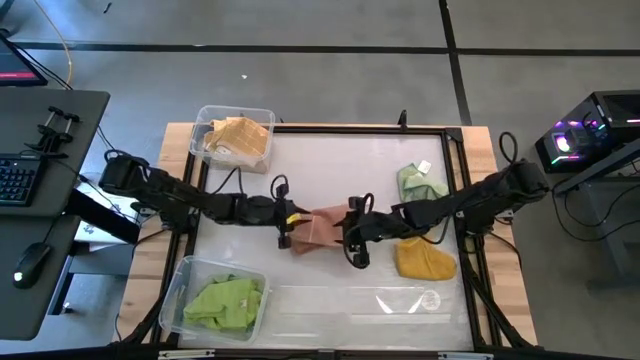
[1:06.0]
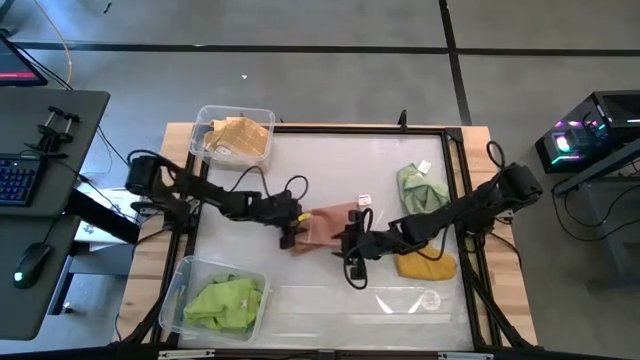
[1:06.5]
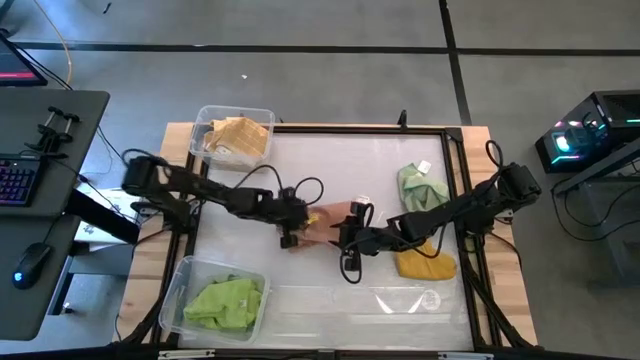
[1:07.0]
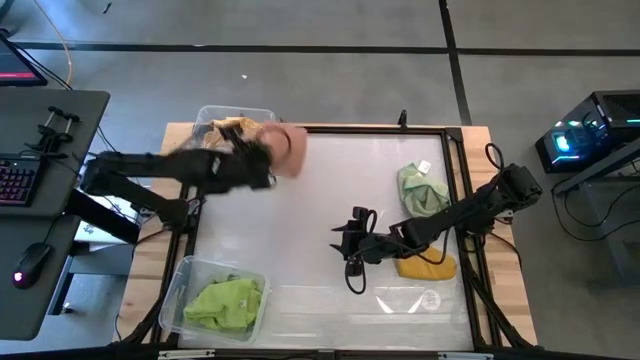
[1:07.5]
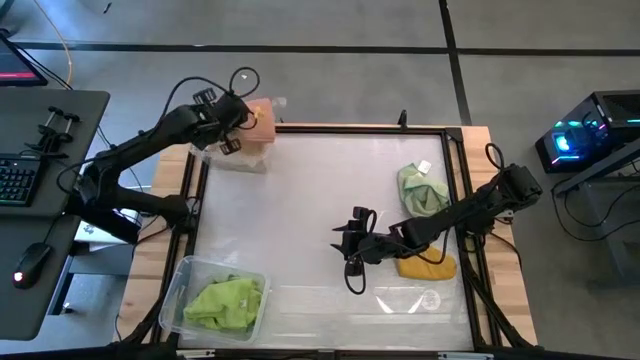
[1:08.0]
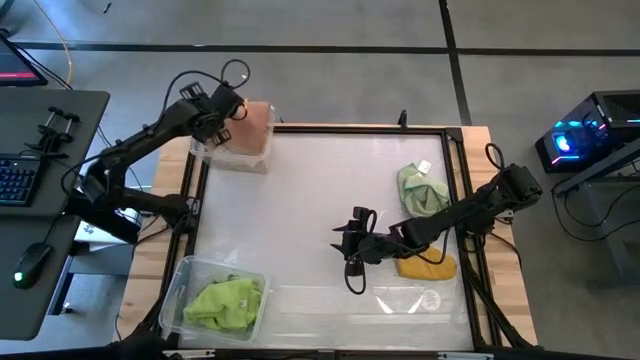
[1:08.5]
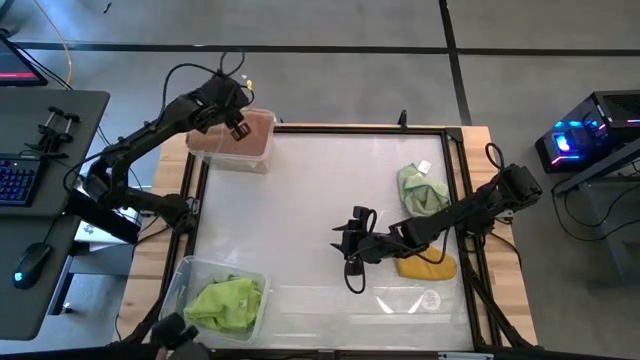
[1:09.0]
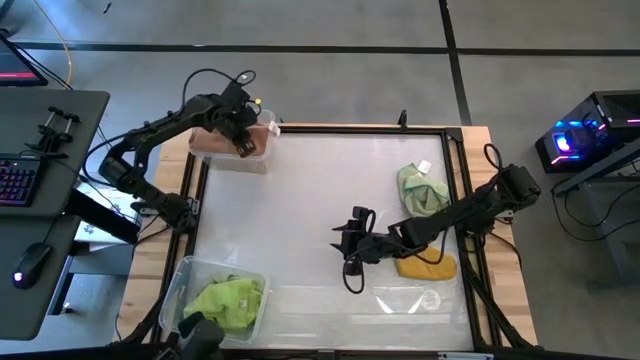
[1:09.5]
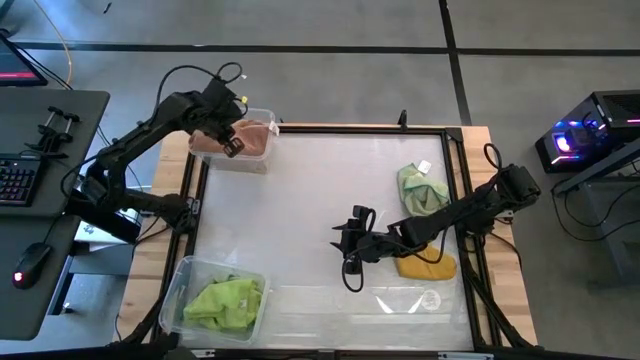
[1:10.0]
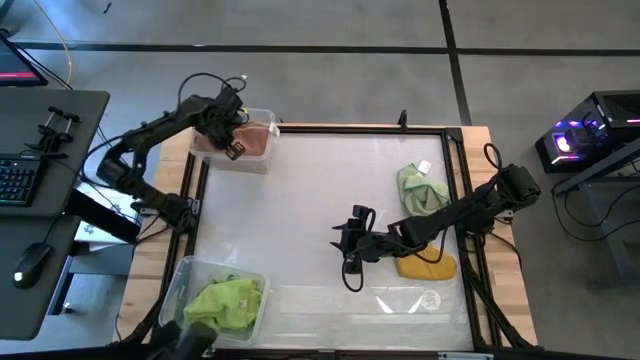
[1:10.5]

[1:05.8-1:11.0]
Task: Sort towels by color in basket
Put the brown towel into the top transparent bin

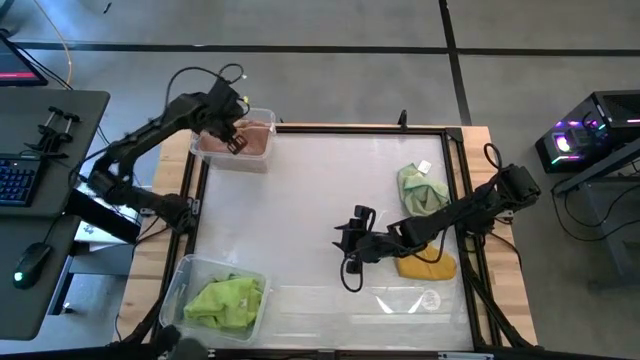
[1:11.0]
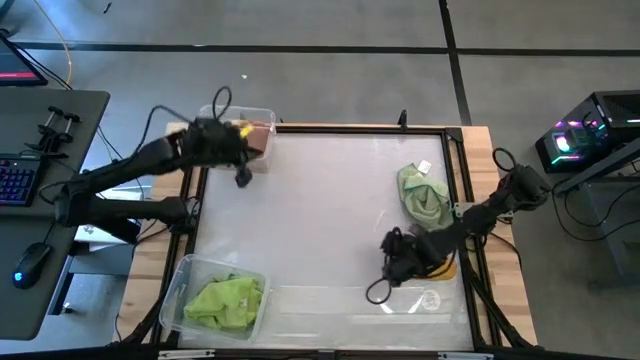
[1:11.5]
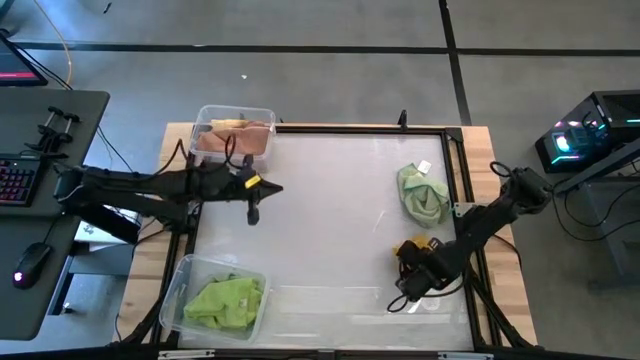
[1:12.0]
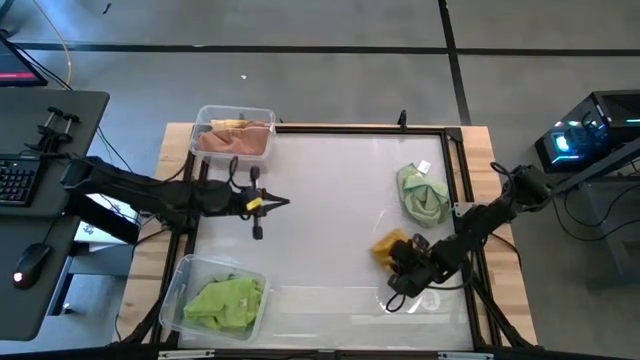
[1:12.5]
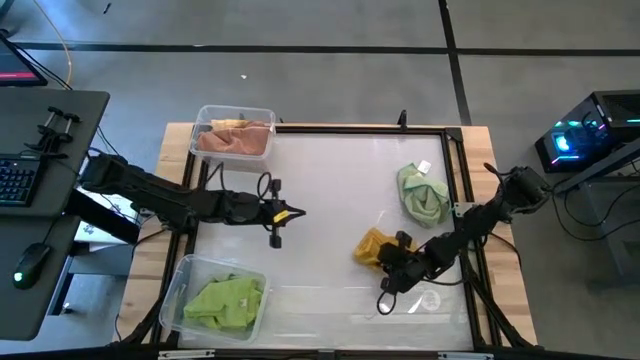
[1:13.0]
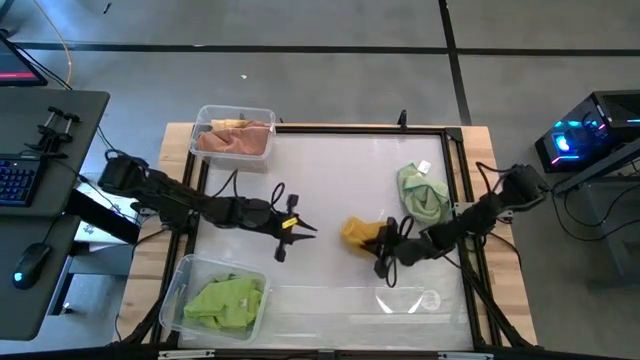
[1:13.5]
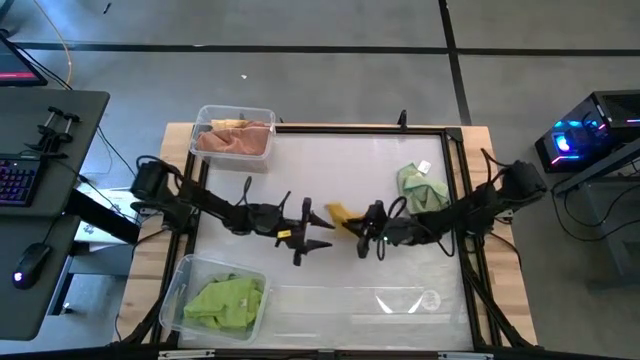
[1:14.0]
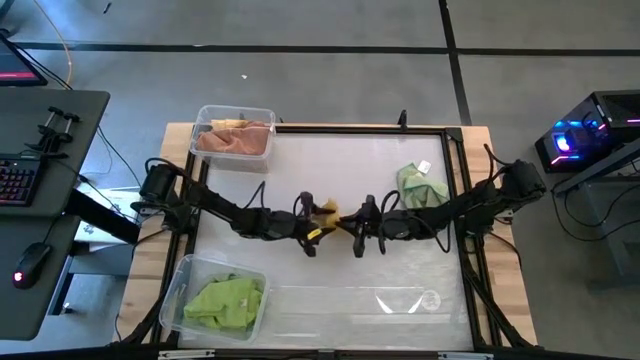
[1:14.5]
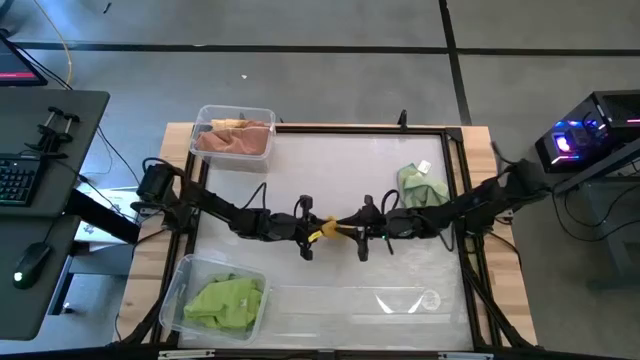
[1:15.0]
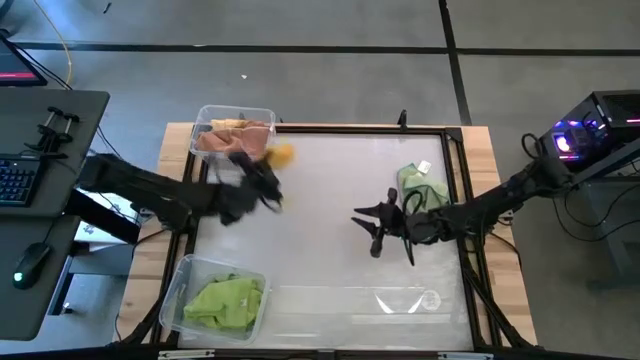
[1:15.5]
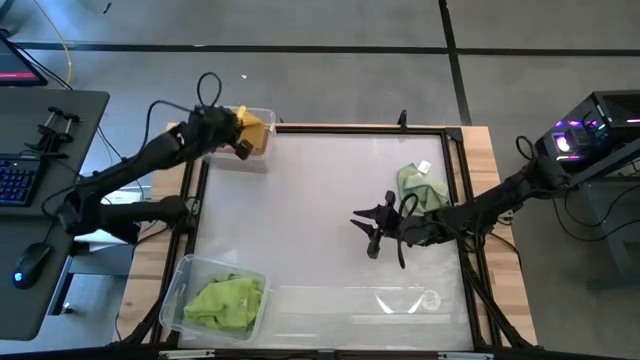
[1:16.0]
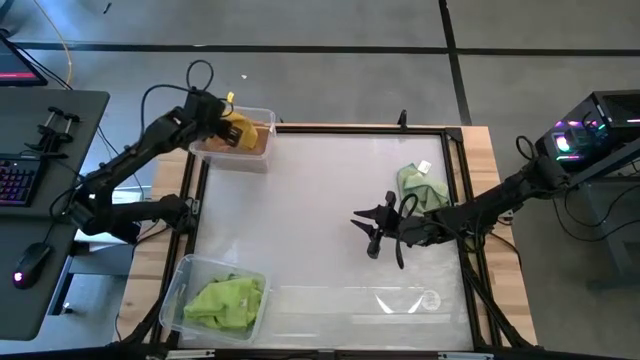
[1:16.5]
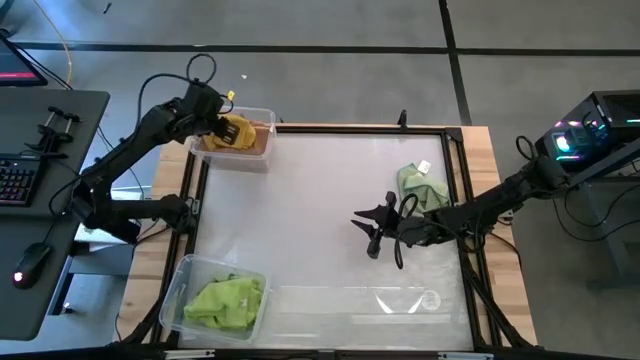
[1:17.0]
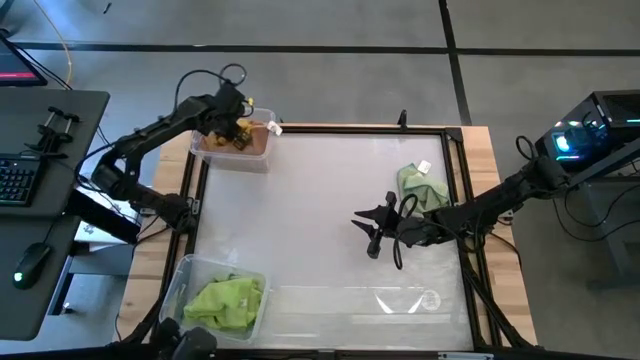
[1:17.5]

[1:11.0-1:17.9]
Put the yellow towel into the top transparent bin

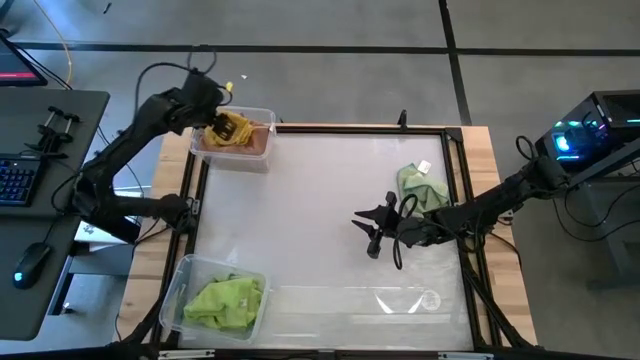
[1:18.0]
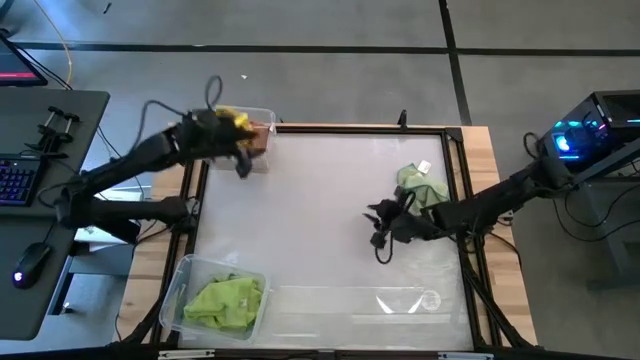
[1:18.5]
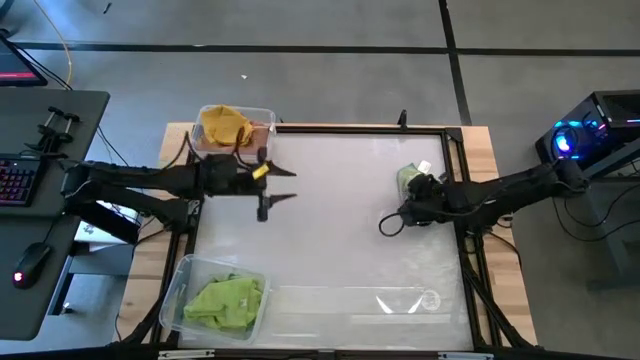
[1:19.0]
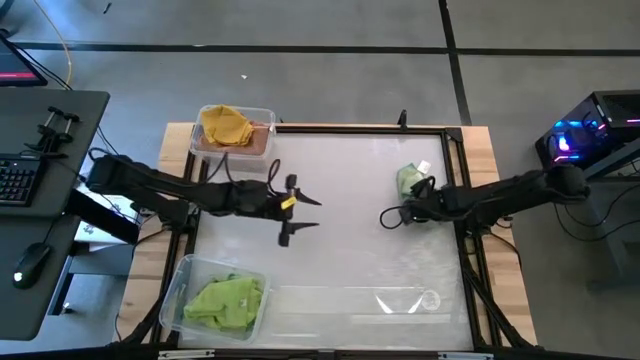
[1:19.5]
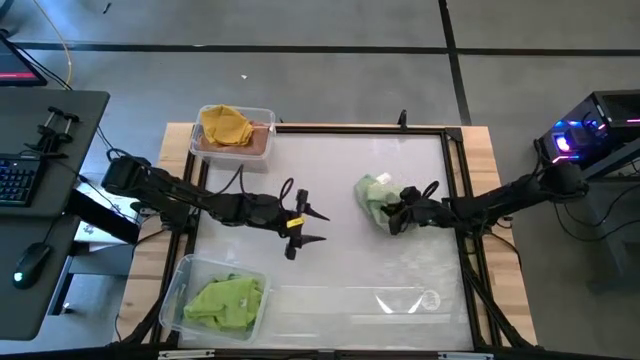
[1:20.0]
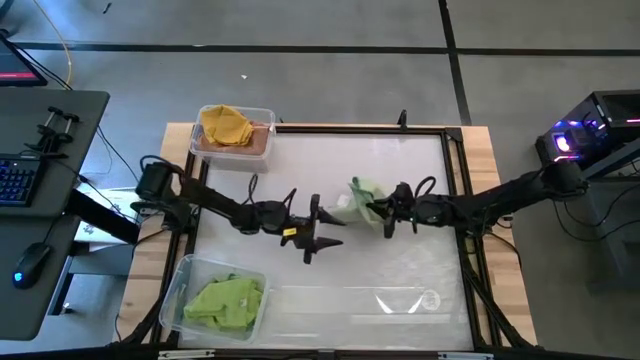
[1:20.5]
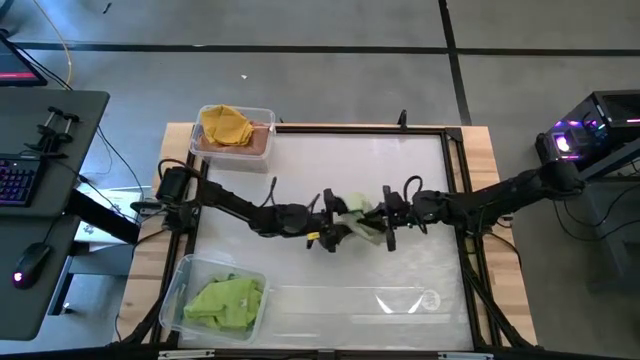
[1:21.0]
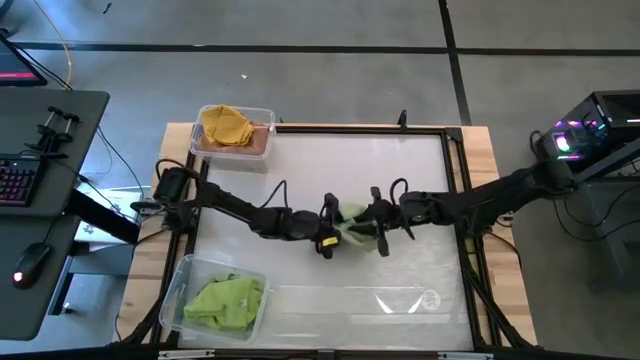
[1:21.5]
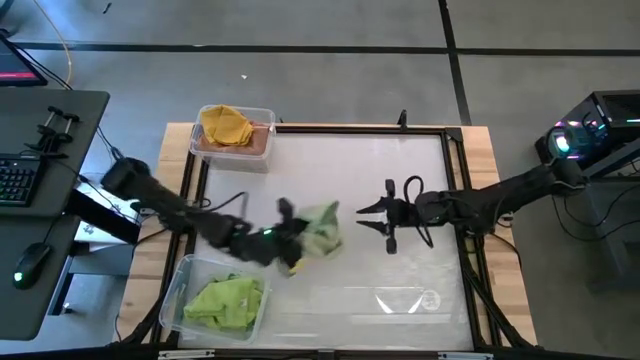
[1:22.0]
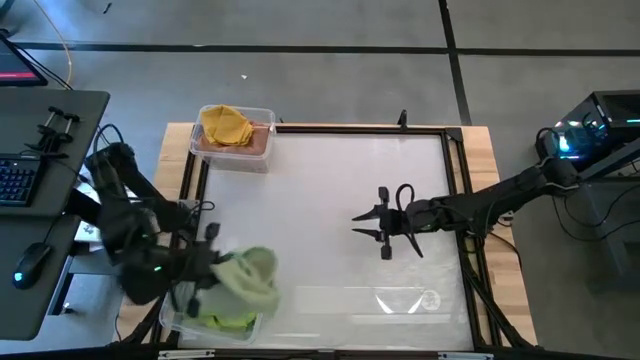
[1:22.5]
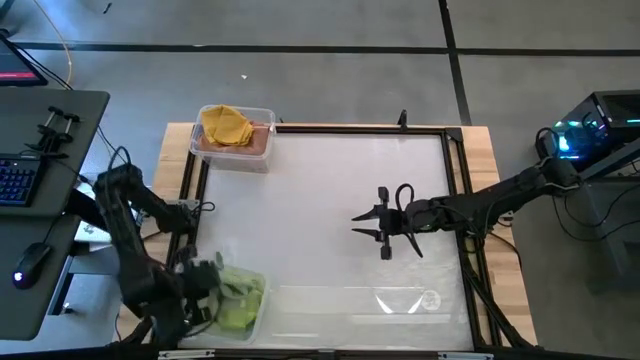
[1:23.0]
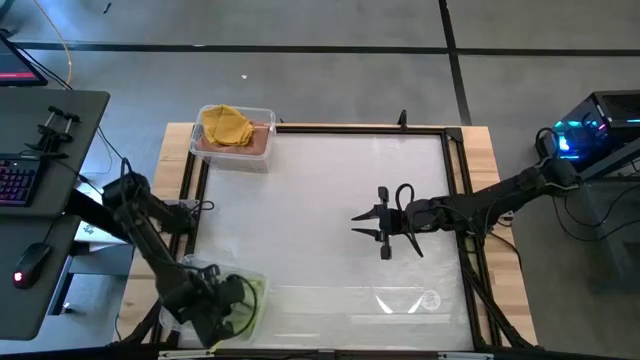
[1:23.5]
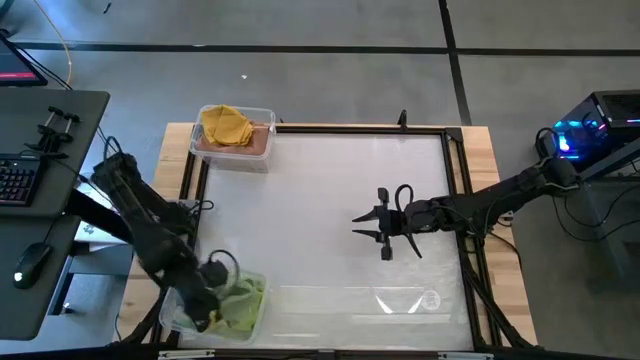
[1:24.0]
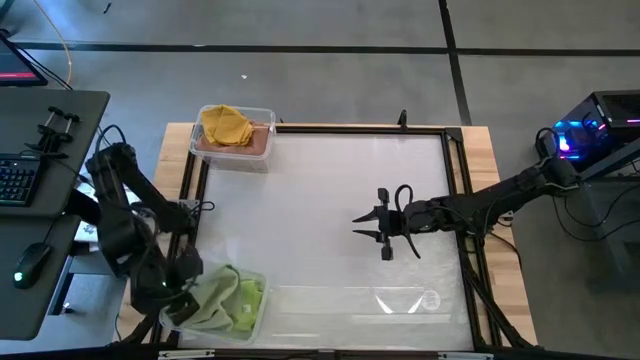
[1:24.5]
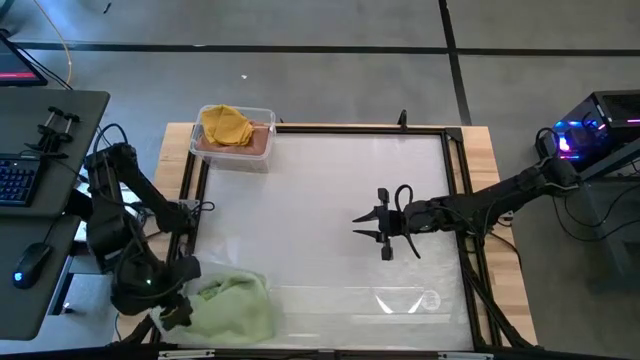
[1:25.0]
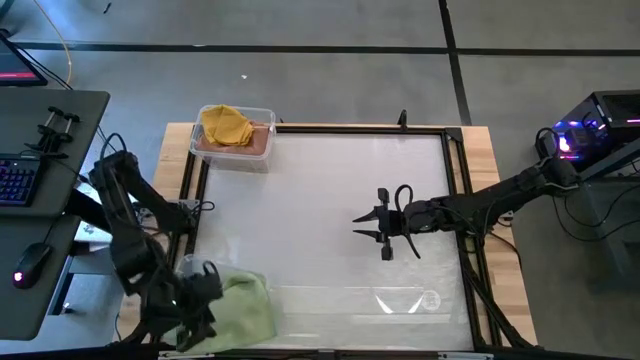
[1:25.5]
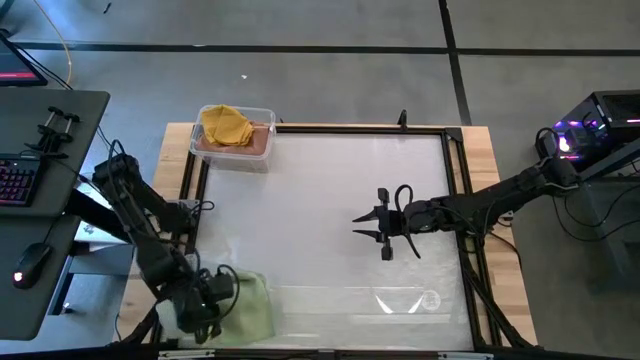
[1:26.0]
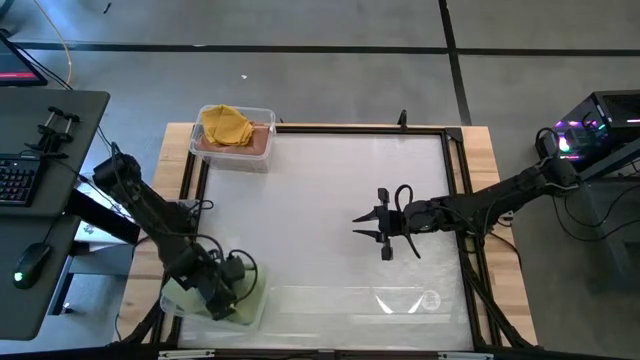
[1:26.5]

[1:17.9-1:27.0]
Put the green towel into the bottom transparent bin

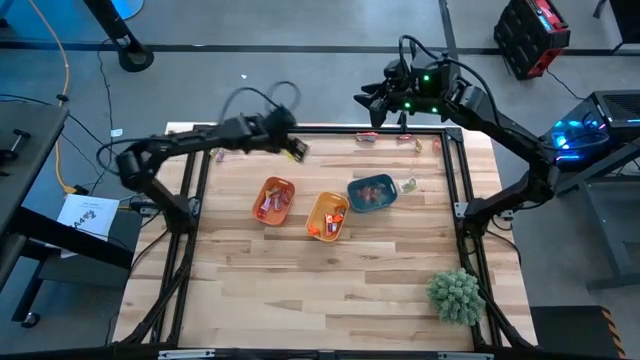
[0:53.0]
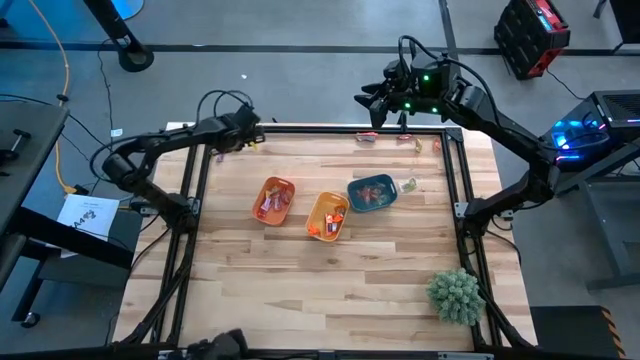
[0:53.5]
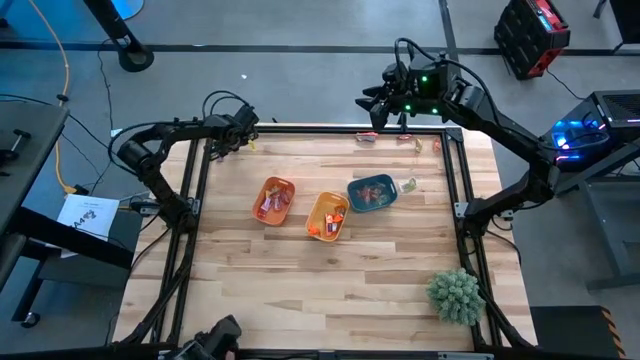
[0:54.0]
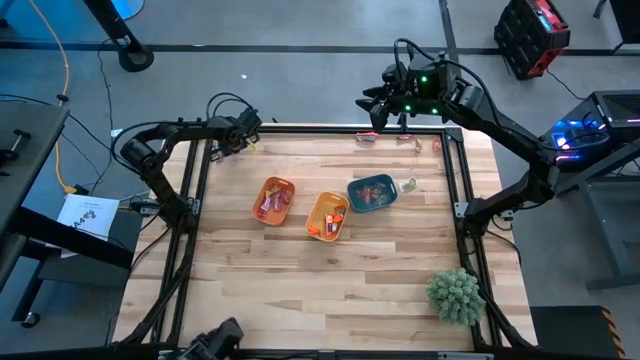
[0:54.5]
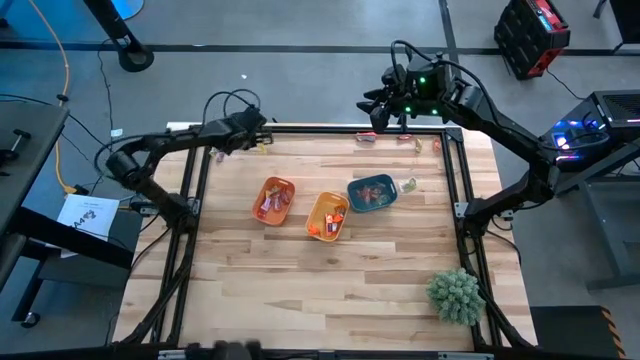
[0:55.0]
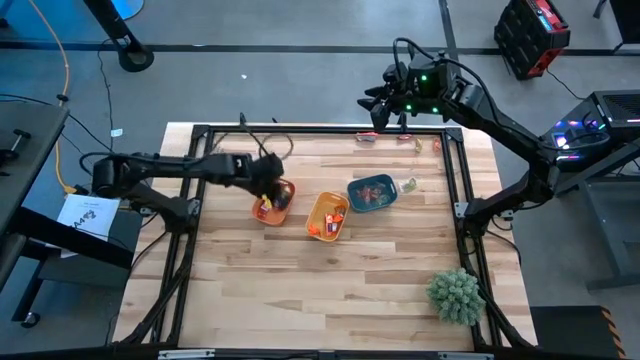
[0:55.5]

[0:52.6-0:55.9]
Task: Sort candy
Put the yellow candy into the orange bin
